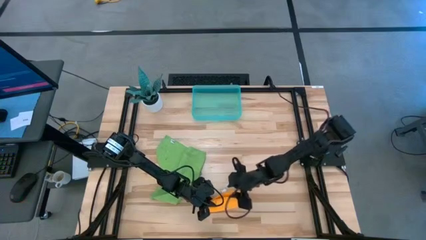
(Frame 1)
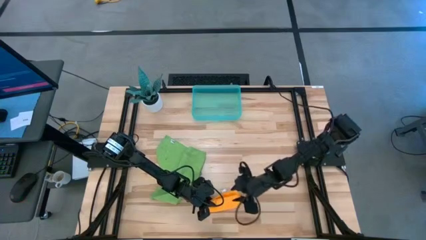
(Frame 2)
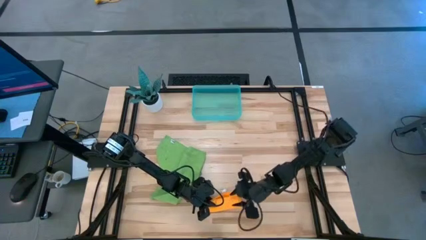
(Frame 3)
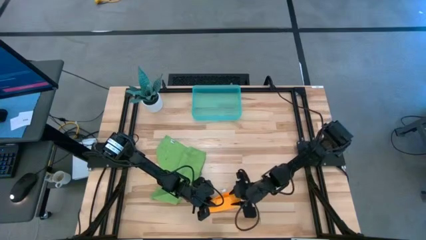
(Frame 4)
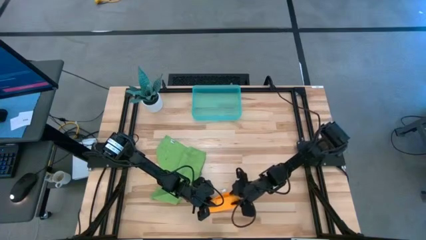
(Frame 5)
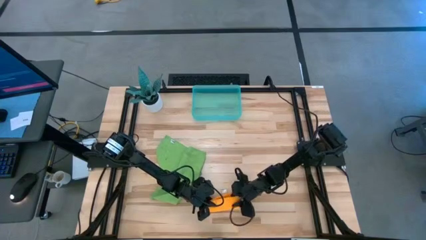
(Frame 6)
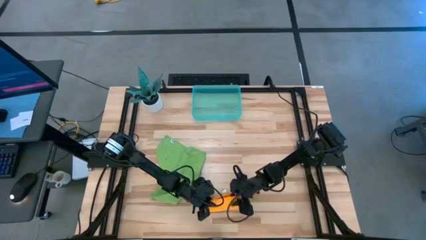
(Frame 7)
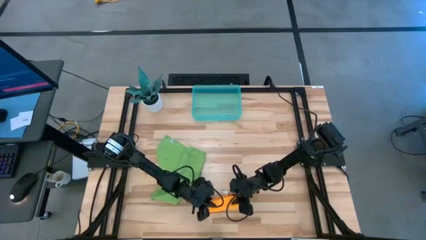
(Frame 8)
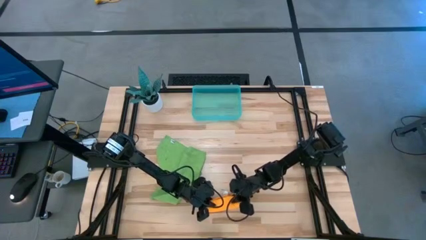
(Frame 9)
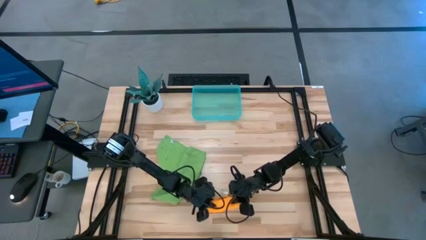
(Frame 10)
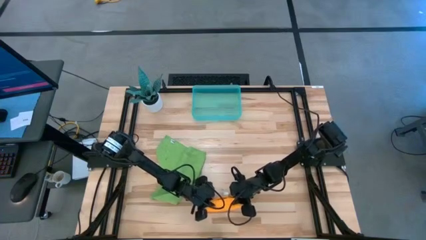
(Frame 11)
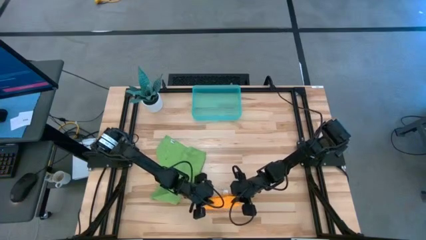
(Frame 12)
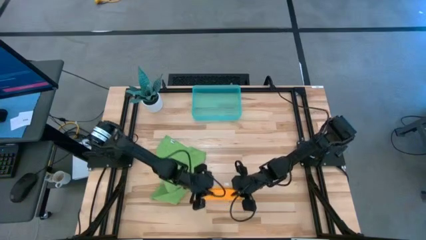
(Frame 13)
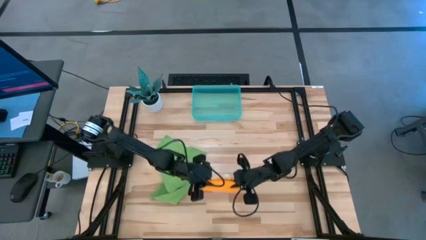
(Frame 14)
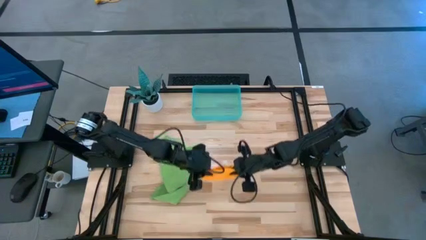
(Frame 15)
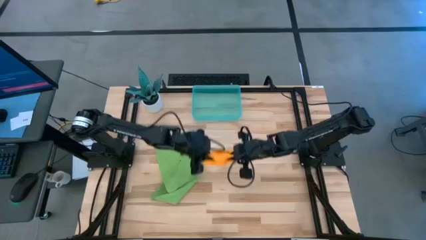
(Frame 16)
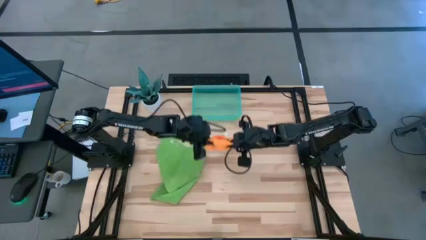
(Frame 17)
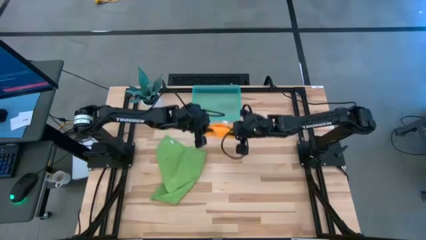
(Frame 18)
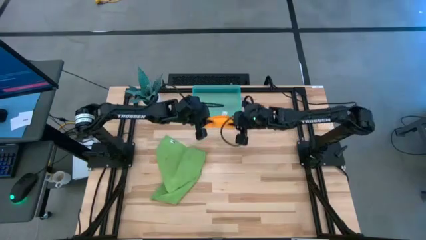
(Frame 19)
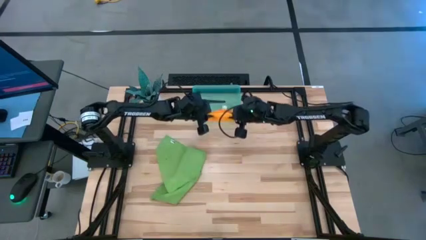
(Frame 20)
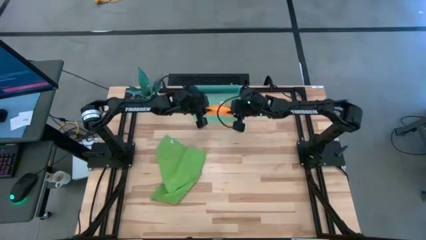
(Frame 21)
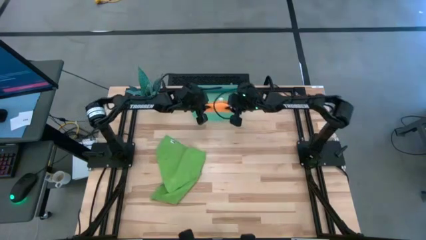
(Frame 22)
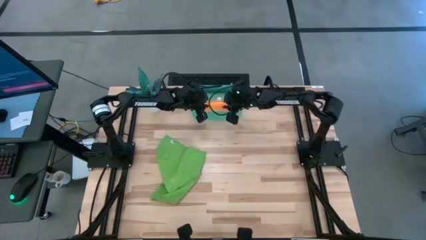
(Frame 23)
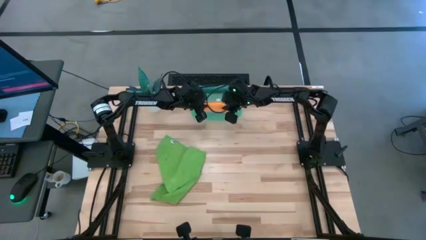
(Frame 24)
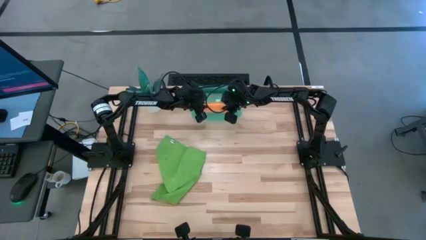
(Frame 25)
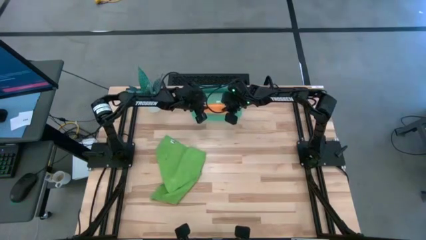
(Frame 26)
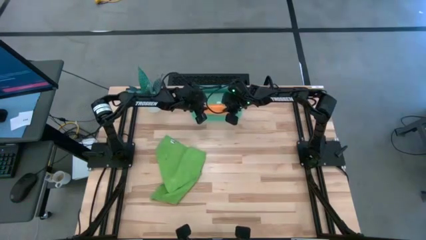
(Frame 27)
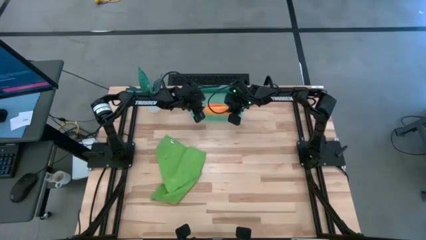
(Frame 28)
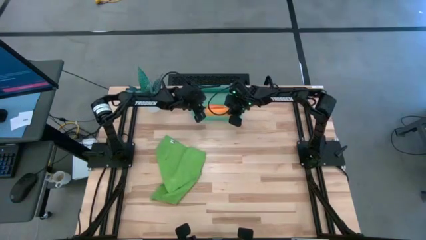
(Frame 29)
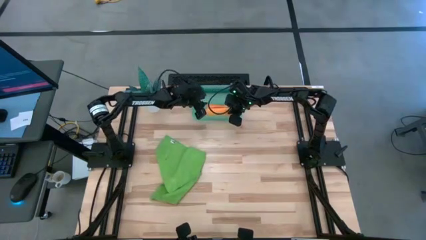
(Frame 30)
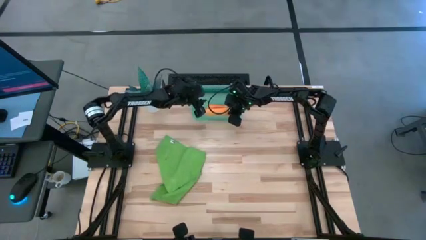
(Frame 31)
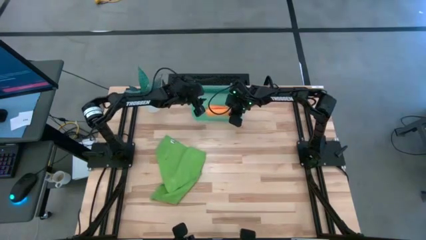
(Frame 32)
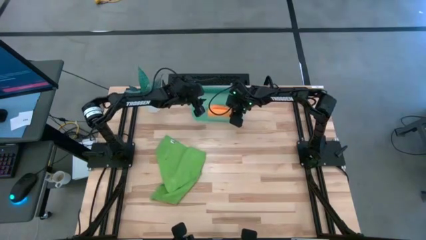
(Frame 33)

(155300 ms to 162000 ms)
Task: Roll microfiber towels into tight, uniform cylinder then place into a basket
Put the rolled orange microfiber cloth into the blue bin

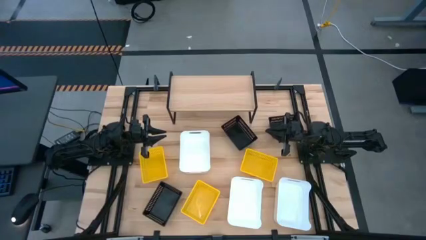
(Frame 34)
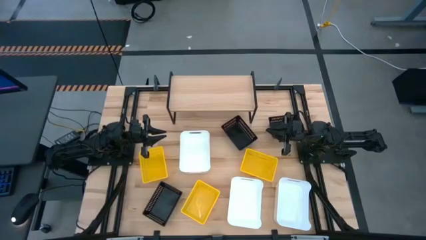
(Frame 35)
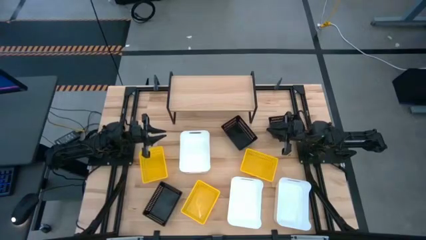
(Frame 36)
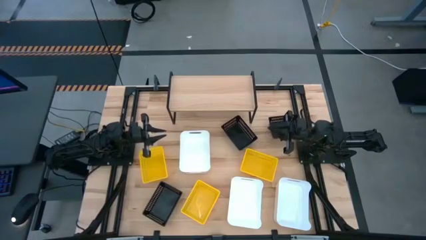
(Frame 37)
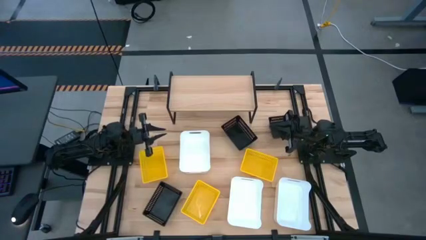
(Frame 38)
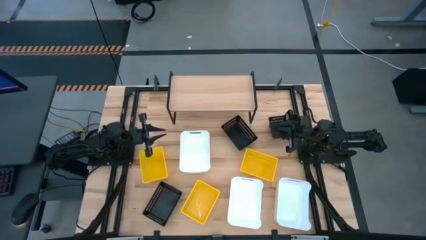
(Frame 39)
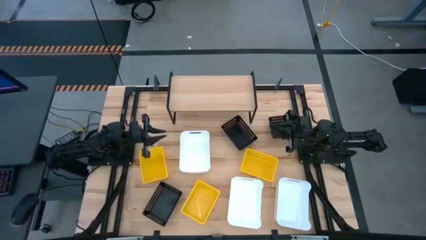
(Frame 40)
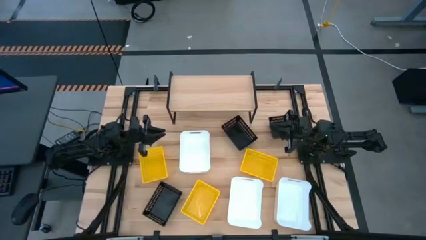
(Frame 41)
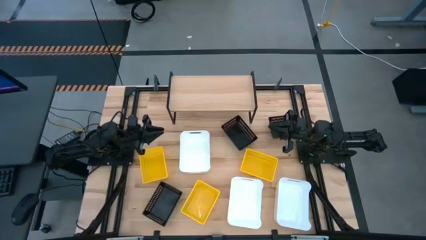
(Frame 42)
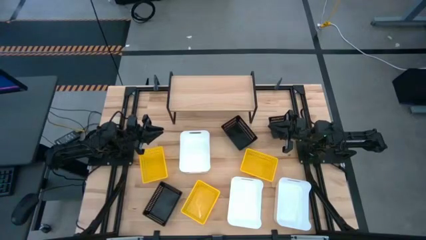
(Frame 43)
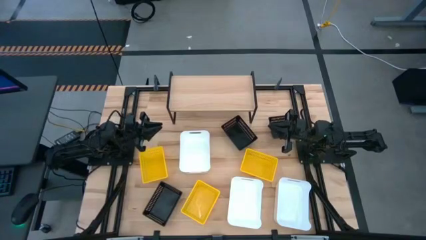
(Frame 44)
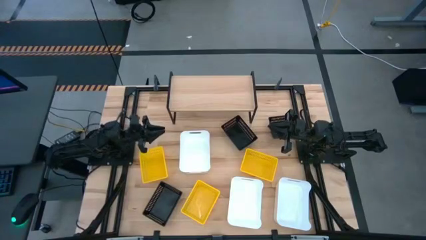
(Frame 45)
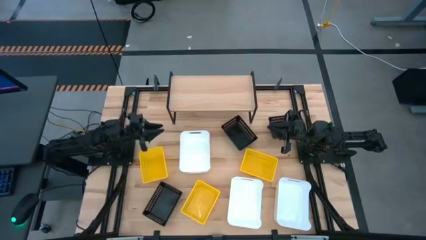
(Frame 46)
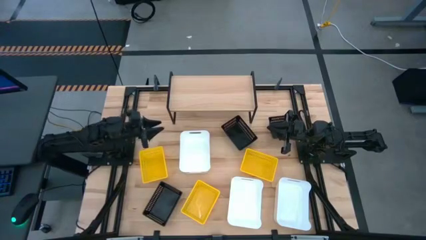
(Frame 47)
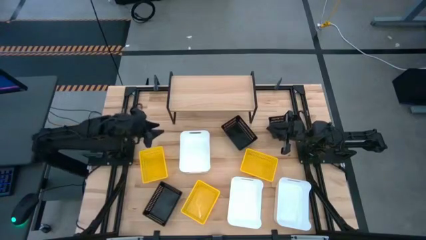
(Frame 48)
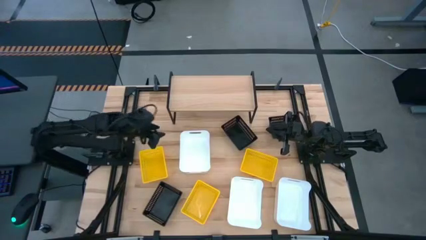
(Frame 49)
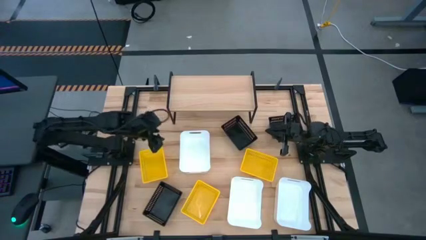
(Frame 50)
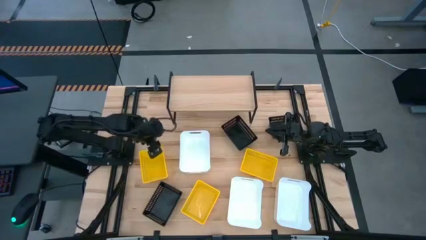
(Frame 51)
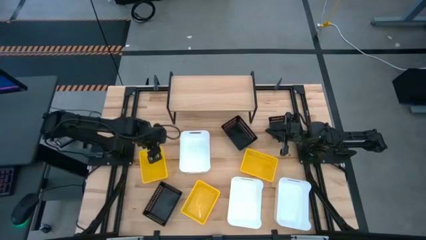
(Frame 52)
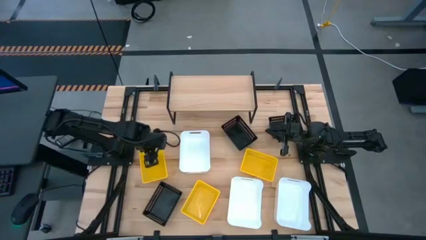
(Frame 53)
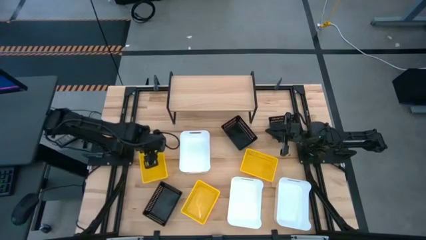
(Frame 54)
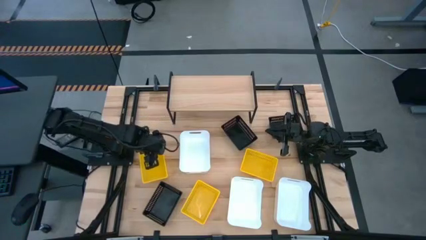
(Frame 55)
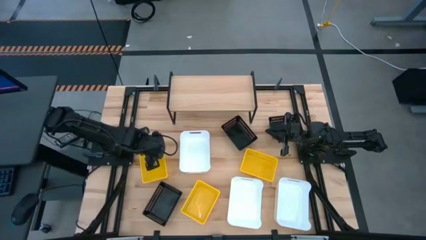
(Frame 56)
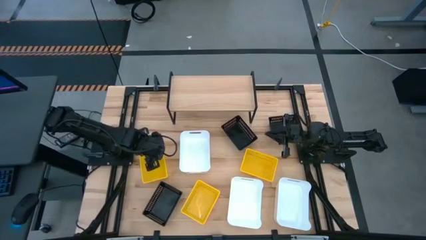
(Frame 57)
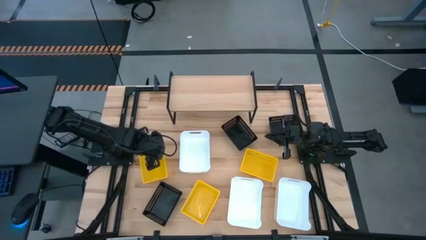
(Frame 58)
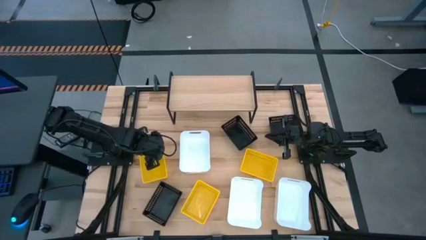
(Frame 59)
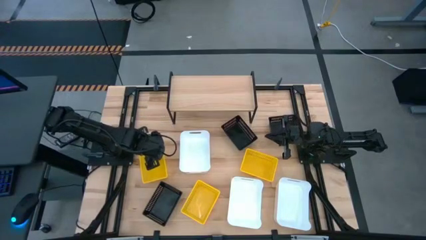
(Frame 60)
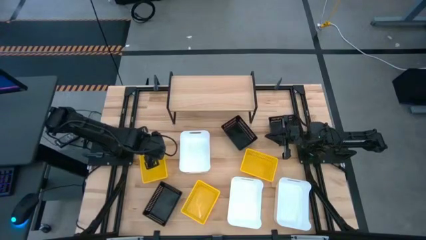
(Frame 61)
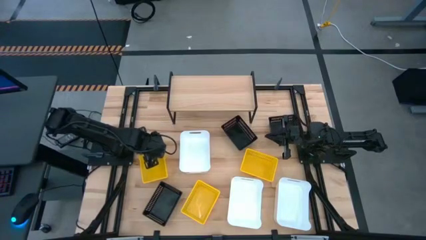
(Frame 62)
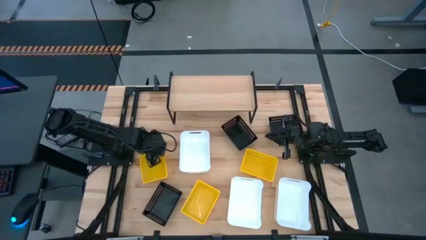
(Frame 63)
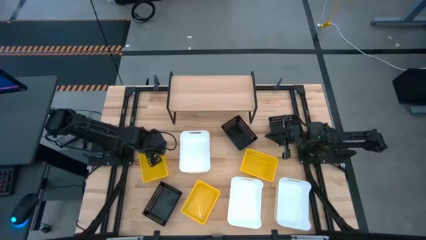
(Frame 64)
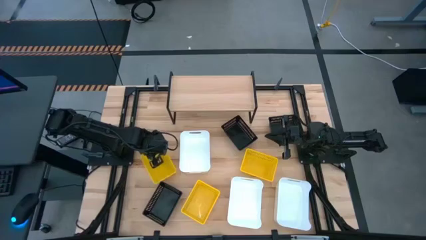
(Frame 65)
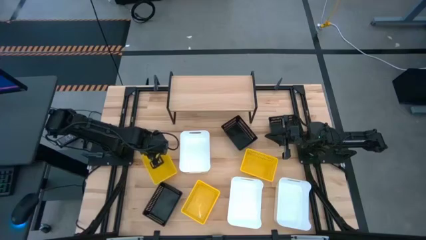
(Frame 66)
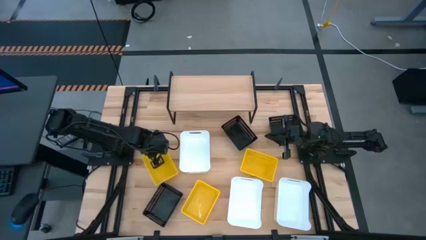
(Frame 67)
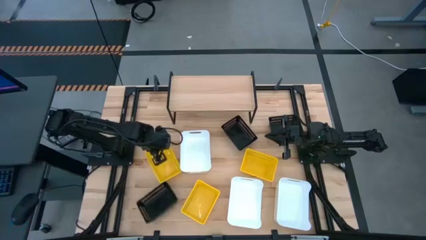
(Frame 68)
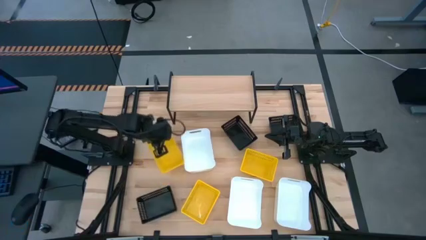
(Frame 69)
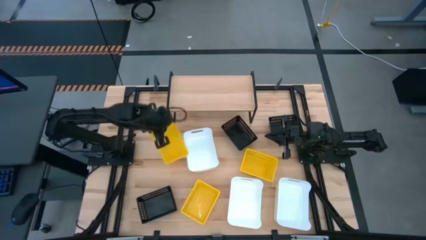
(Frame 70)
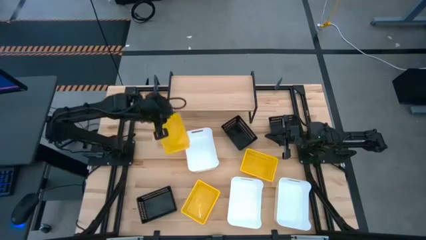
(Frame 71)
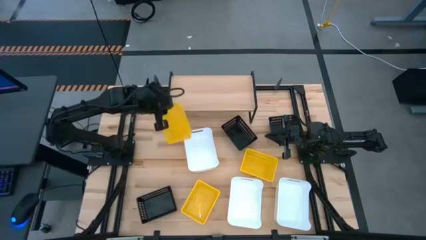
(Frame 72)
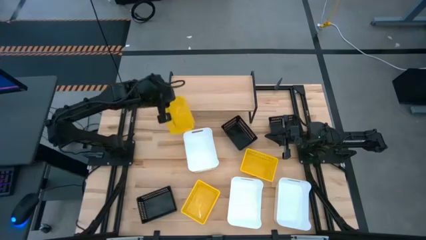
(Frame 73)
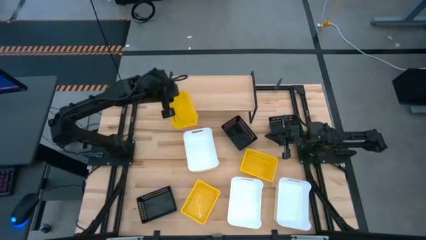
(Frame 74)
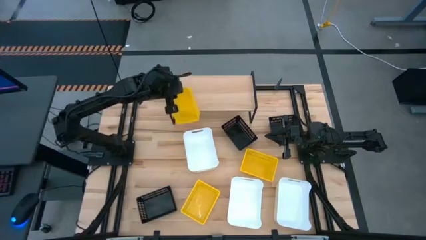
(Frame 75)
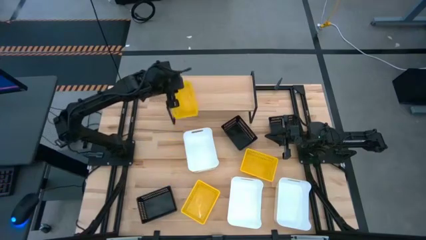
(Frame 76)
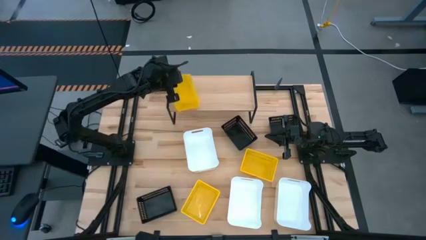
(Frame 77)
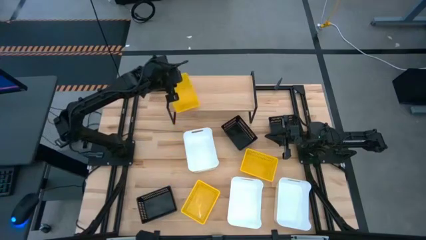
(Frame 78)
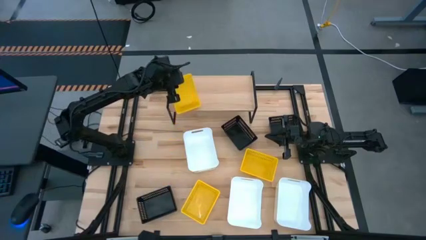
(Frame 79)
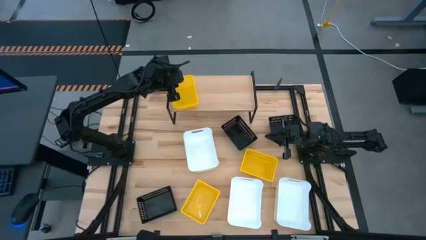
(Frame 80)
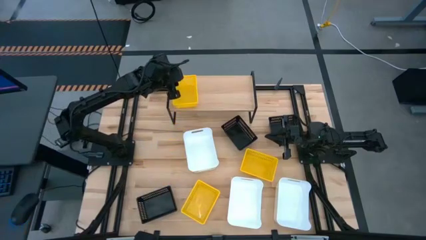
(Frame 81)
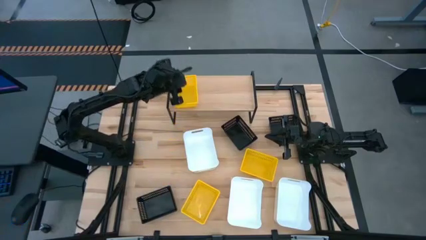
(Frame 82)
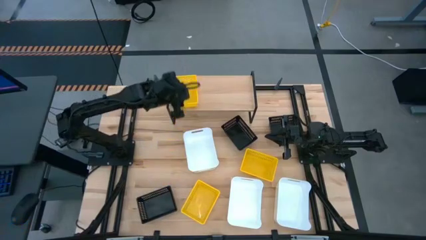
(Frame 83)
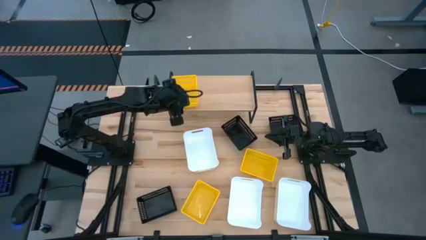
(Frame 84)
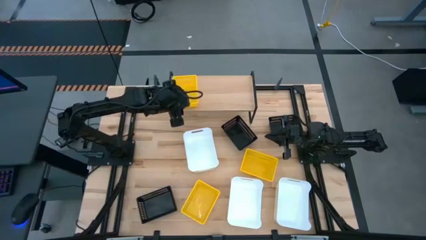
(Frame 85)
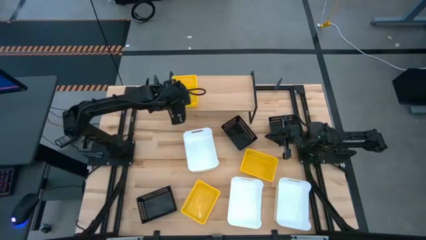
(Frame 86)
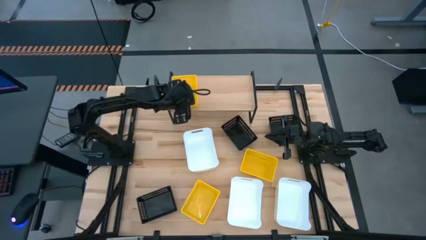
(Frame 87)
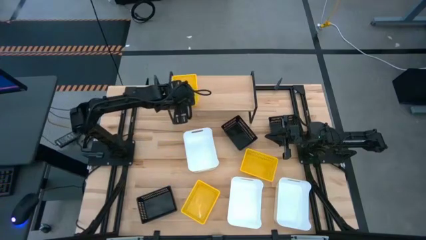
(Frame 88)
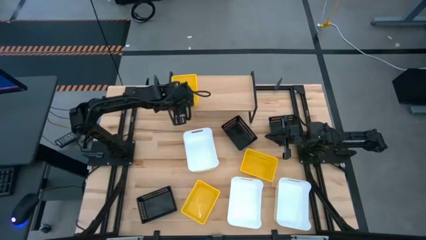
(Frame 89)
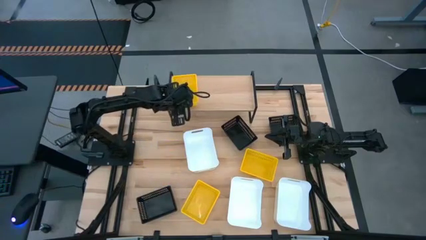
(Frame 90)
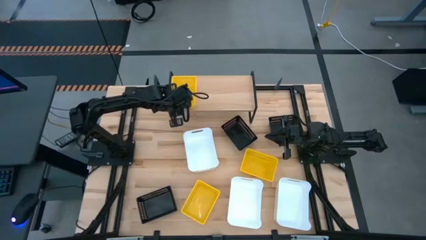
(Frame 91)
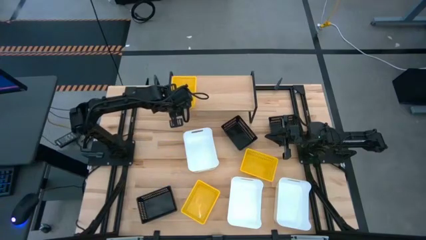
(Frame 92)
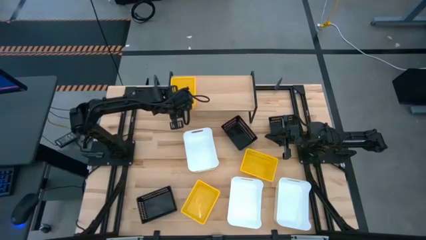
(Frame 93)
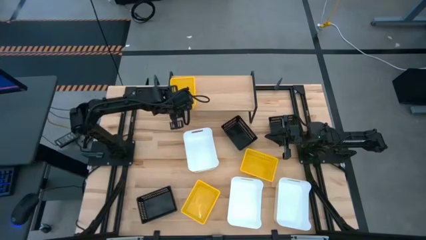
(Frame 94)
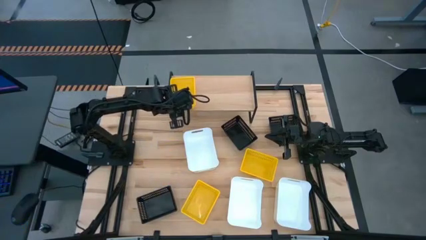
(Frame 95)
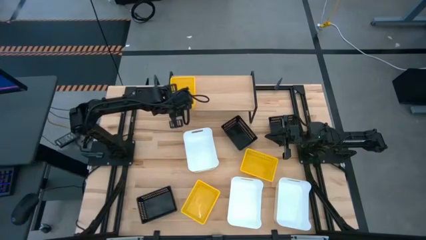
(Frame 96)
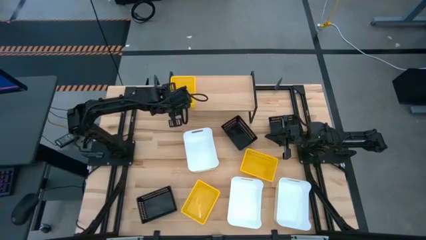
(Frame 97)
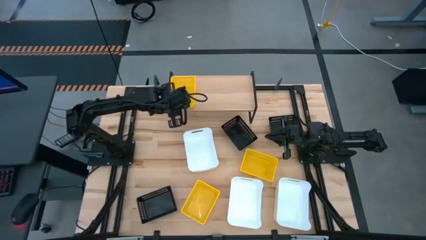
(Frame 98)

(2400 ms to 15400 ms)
Task: Stack baskets on shelf by color
Put the left yellow basket on the shelf
